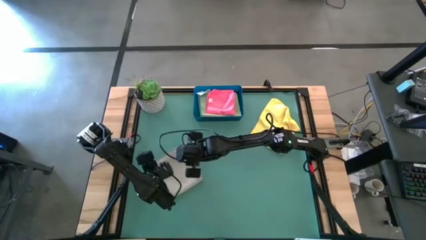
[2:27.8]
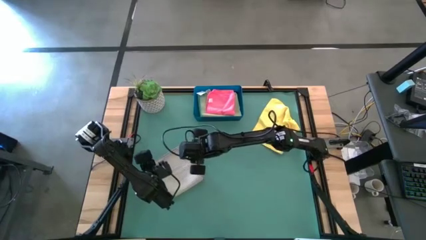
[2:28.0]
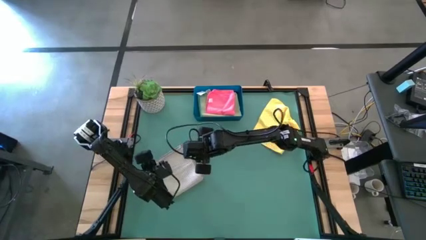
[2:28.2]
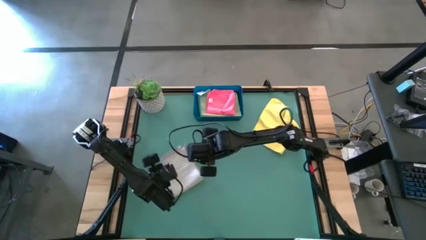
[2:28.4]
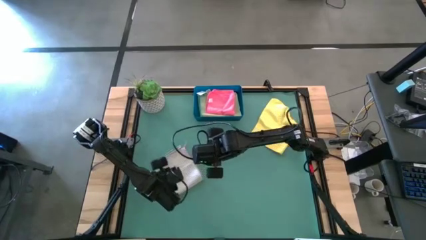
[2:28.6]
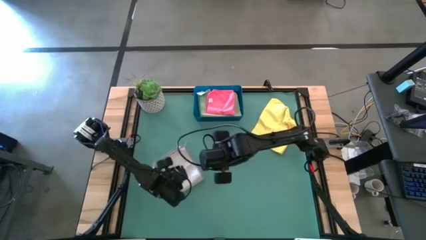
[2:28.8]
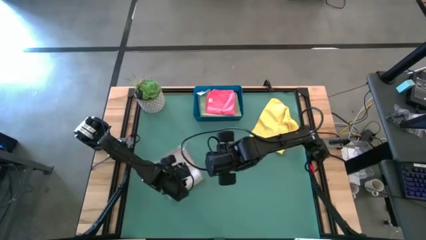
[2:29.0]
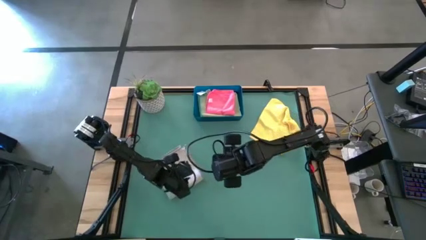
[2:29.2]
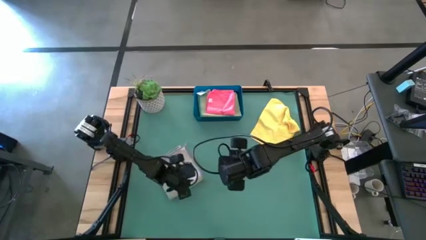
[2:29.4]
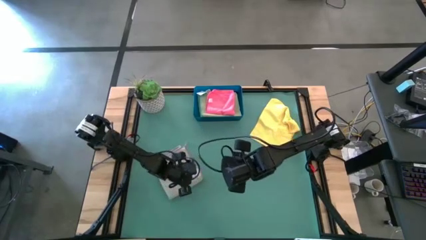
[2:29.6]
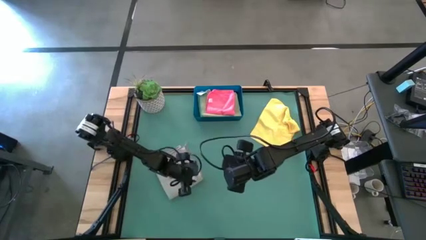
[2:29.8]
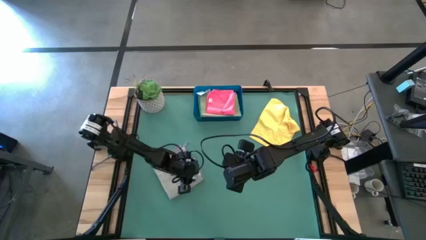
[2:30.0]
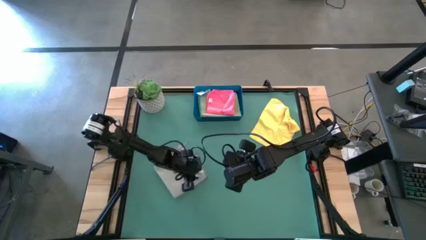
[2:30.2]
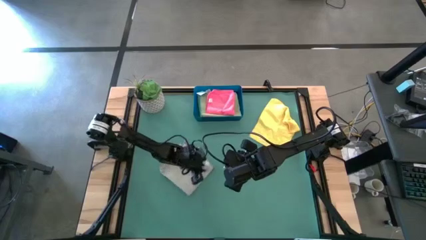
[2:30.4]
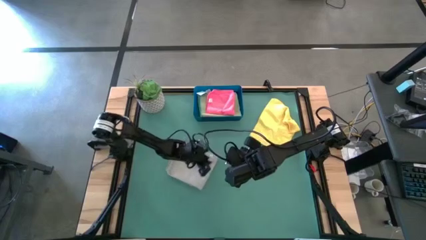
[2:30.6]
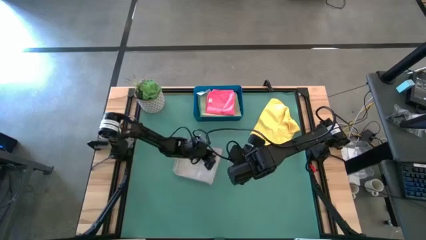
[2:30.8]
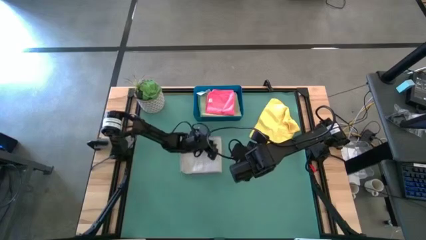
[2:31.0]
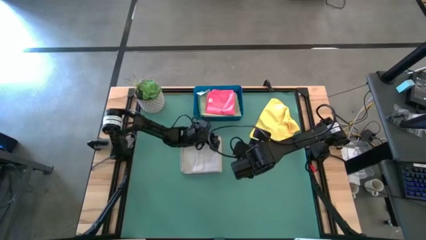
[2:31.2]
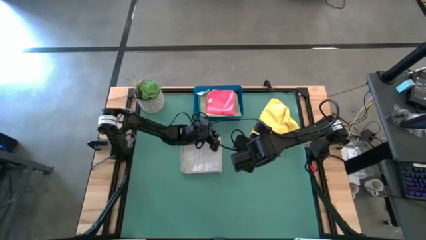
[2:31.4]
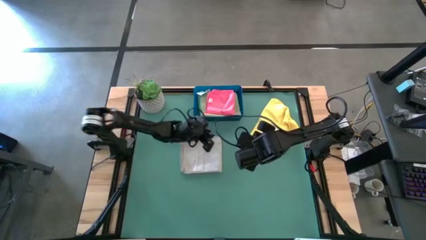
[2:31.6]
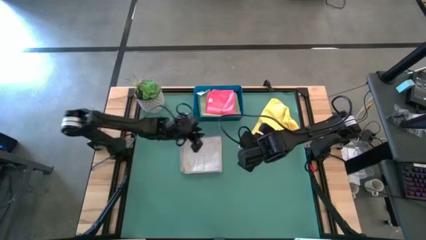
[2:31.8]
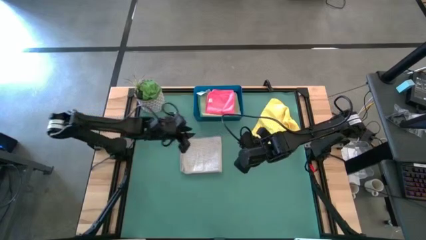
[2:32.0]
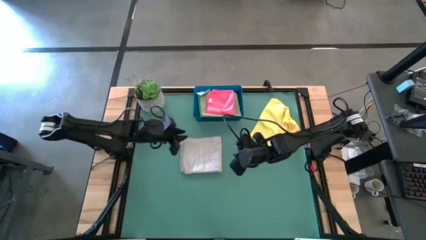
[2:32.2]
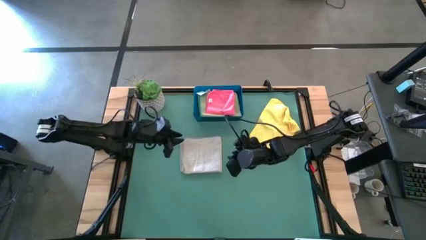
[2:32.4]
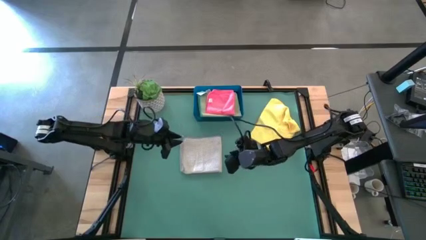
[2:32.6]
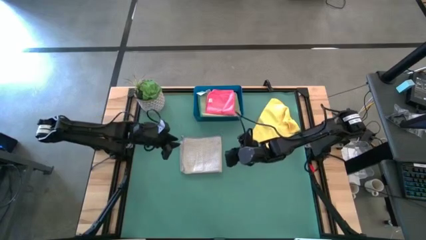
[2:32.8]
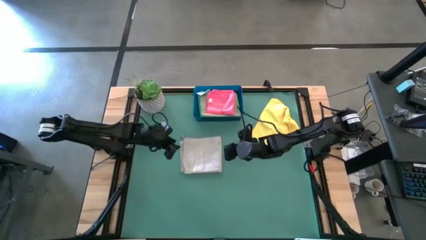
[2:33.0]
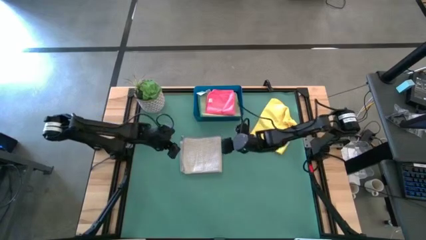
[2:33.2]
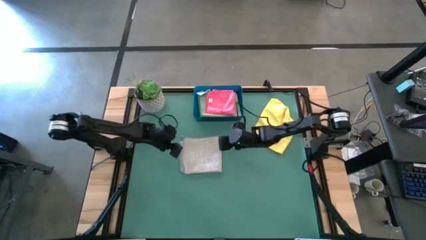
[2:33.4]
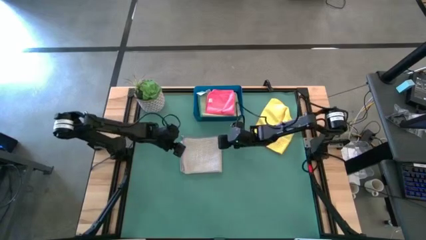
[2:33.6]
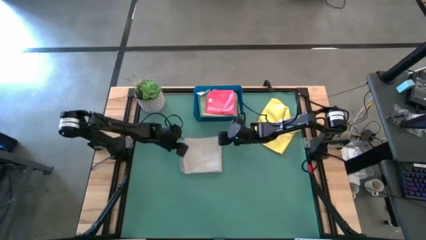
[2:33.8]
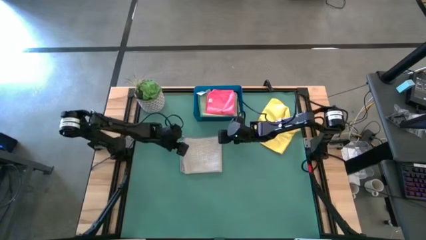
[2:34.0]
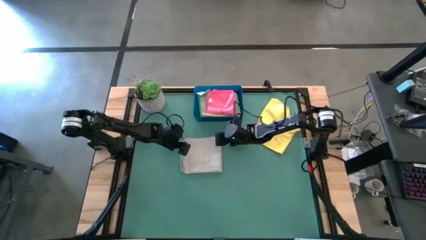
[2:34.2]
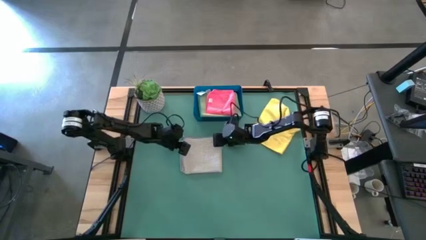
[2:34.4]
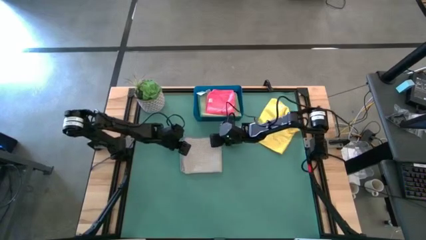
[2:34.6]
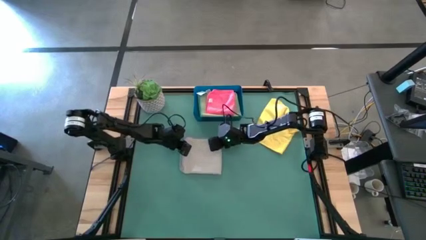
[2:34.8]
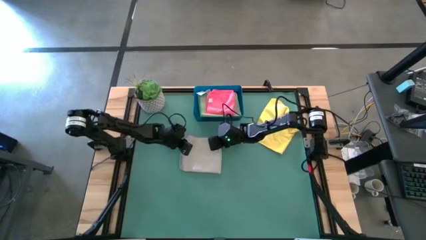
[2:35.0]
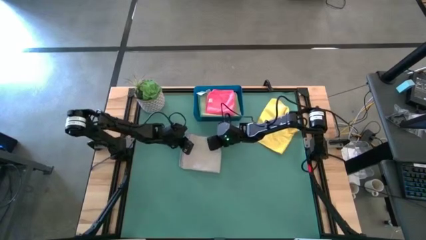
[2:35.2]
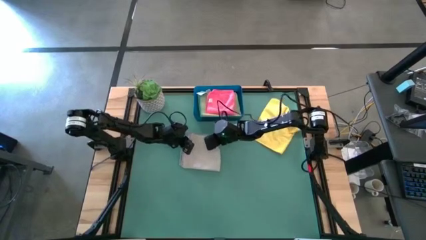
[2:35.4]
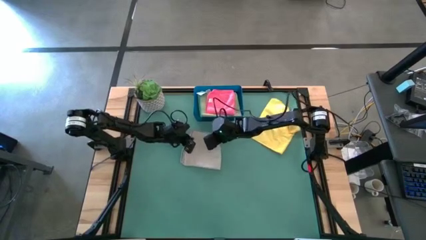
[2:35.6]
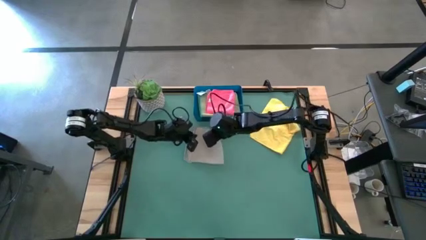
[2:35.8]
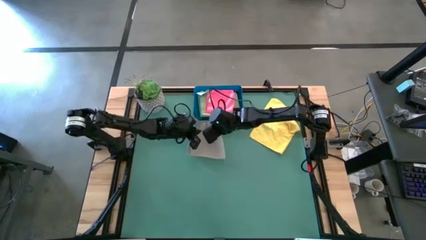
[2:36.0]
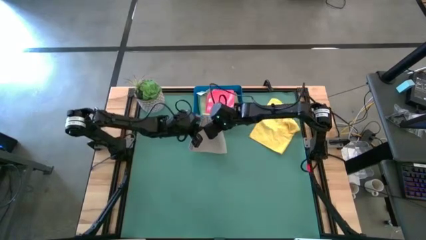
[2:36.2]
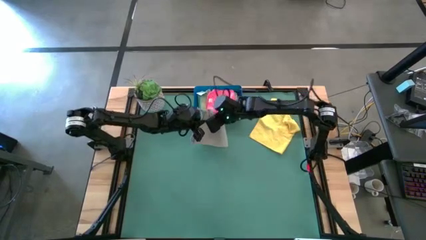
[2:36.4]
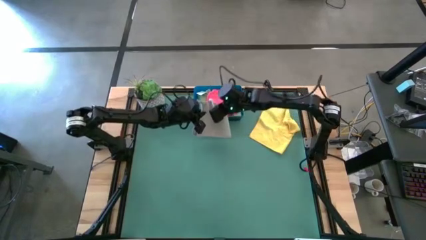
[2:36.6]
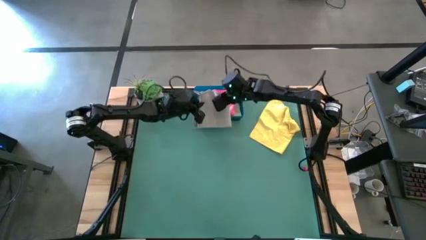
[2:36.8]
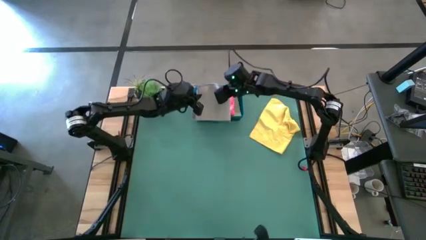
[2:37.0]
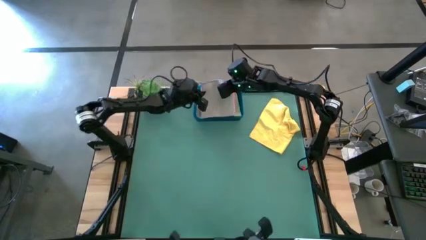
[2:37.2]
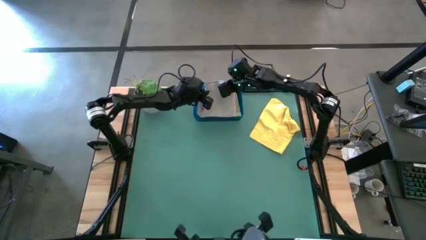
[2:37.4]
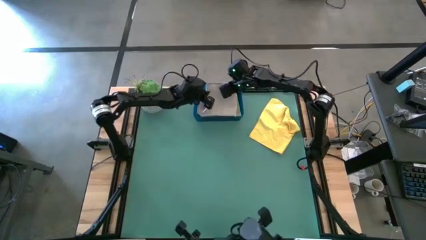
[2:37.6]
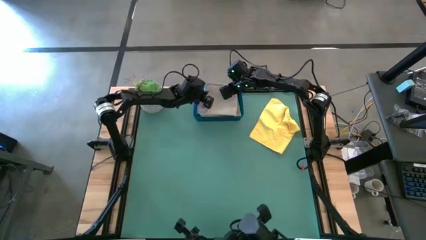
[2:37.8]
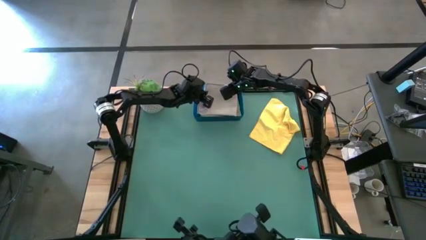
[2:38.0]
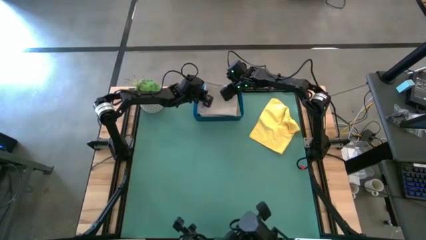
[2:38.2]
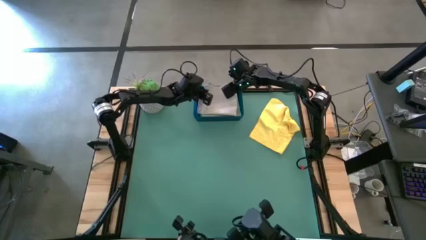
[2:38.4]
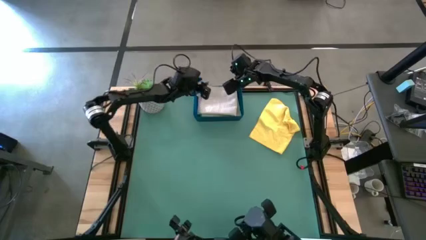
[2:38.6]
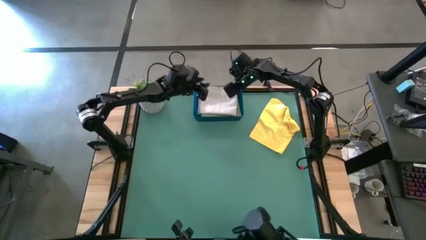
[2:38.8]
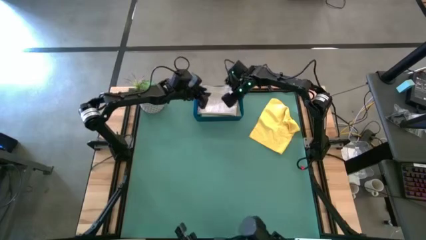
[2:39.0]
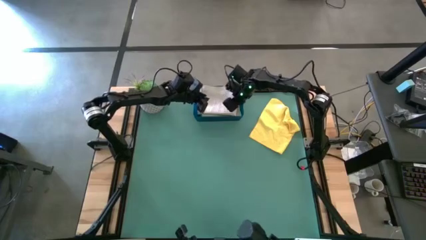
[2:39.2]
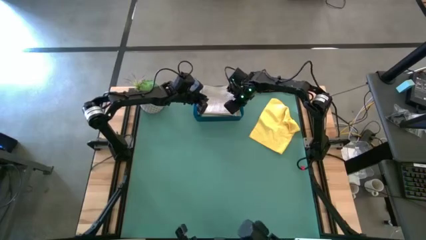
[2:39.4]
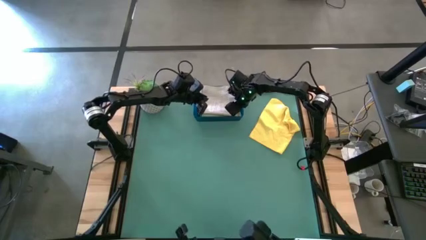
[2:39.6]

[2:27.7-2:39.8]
Task: Fold microfiber towels
Put the folded gray microfiber towel into the blue bin

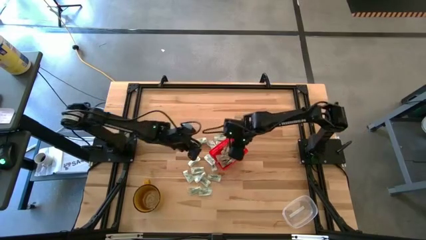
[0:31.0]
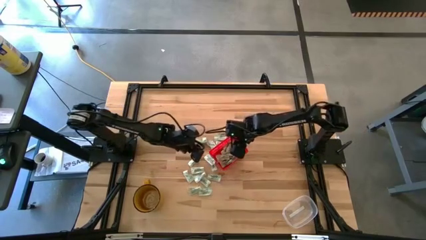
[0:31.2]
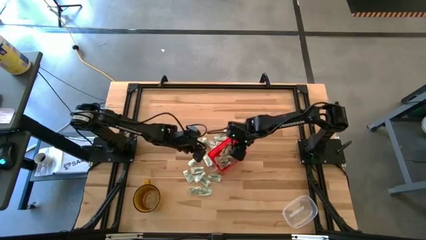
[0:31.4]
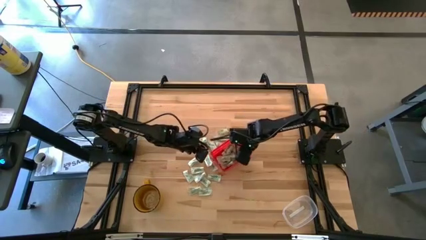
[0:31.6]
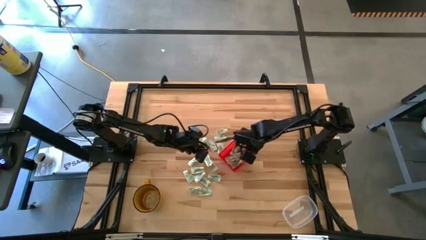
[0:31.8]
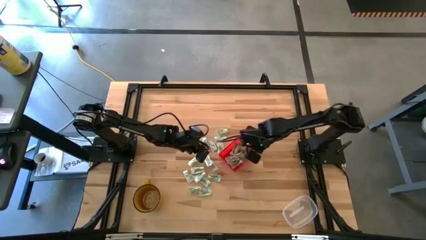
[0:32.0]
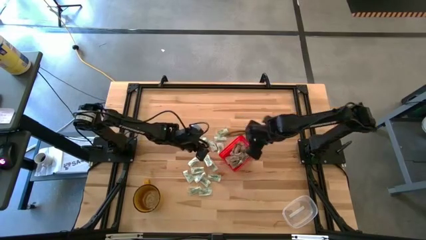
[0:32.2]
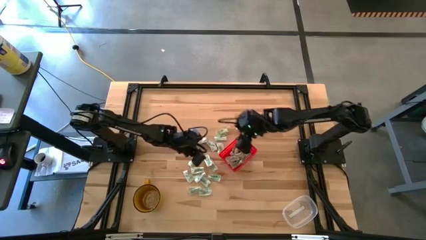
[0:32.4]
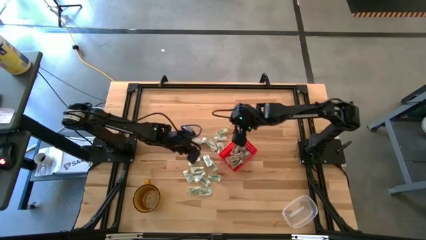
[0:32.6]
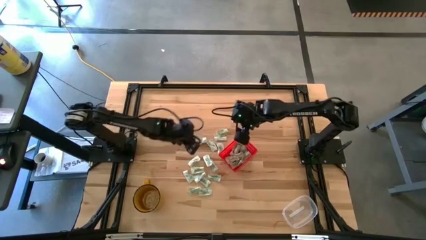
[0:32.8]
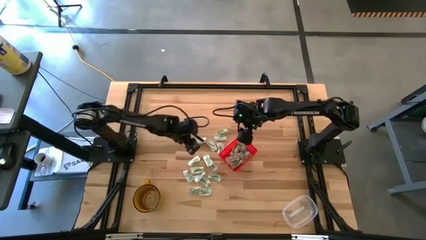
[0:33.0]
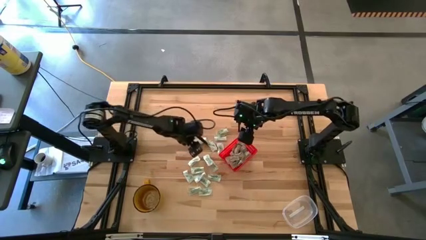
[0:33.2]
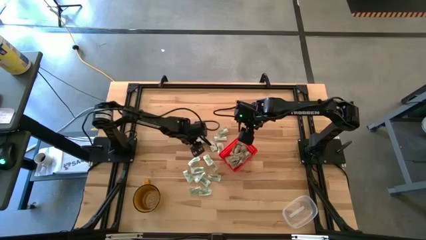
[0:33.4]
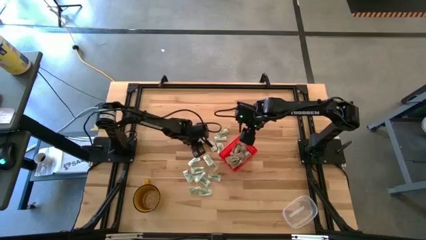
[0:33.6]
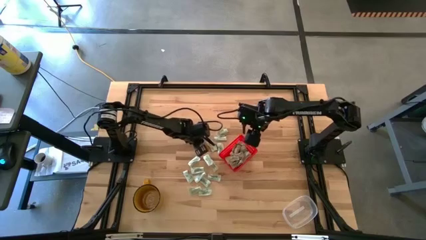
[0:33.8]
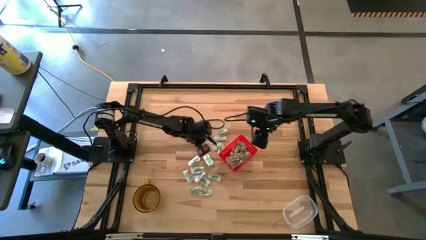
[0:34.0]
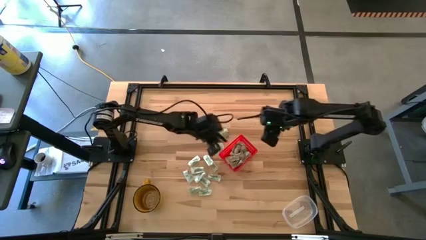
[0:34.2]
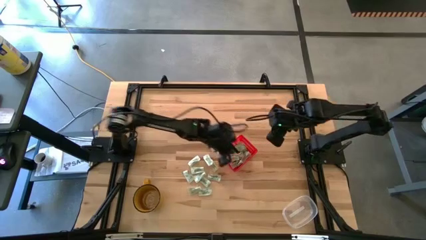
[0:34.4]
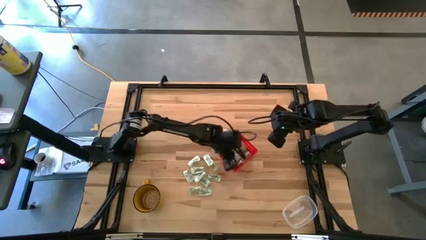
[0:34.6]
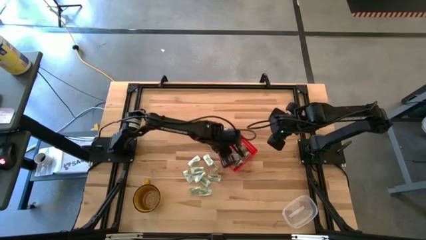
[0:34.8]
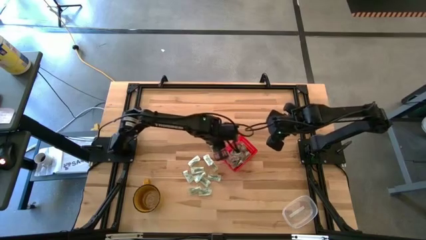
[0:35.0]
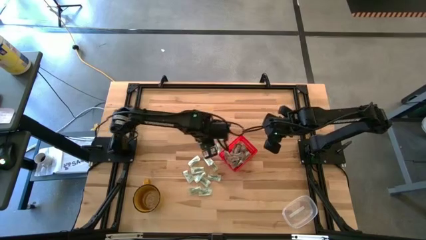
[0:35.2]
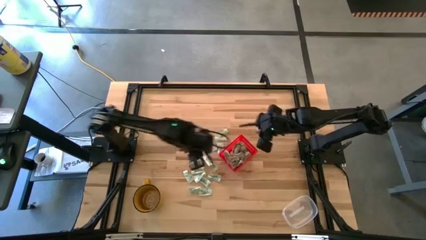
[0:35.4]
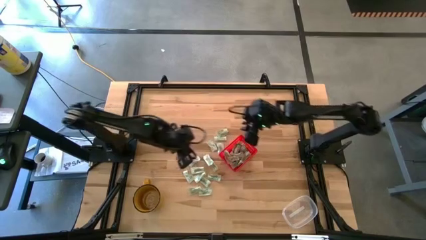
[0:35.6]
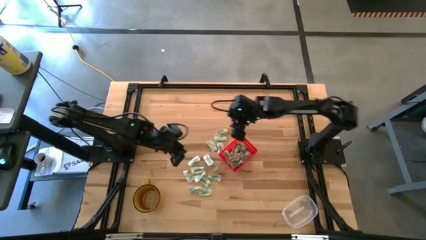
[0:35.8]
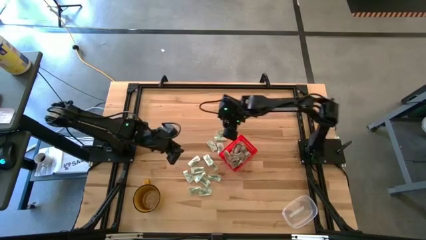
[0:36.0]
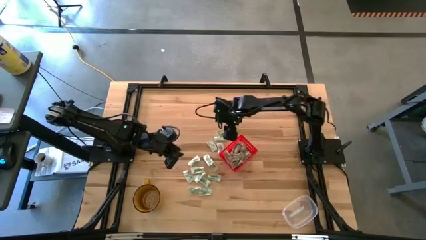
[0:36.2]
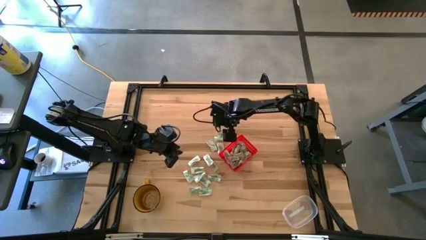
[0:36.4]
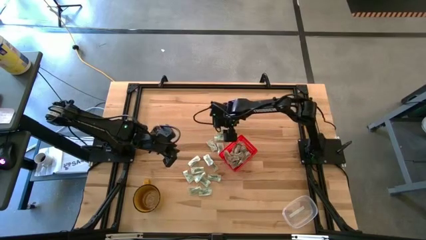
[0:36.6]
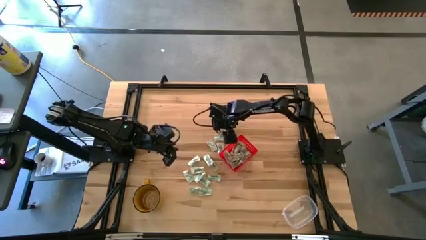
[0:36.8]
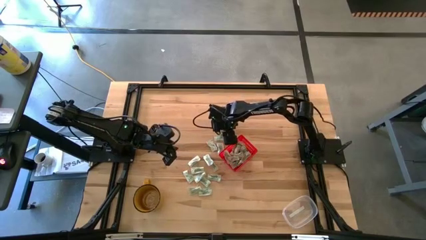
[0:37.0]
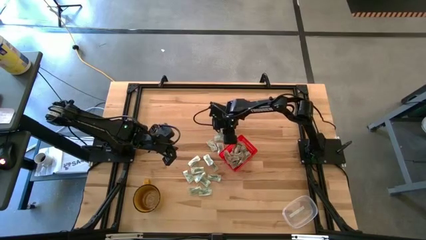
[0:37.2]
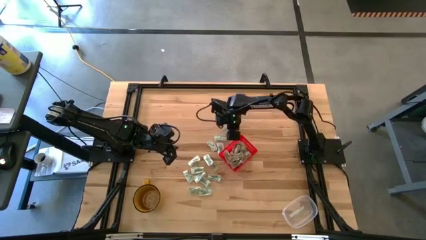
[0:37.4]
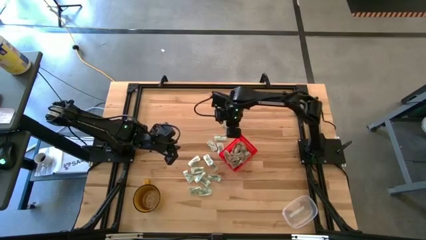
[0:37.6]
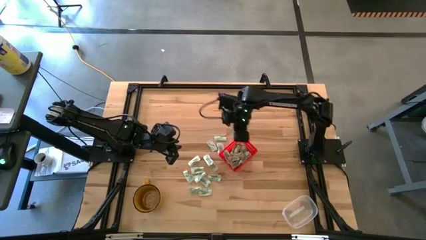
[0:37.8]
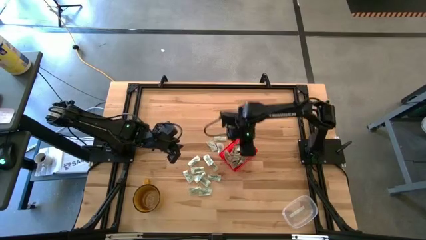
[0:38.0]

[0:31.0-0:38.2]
Task: Pick and place items into bin
Put the light green stevia packet into the red bin
